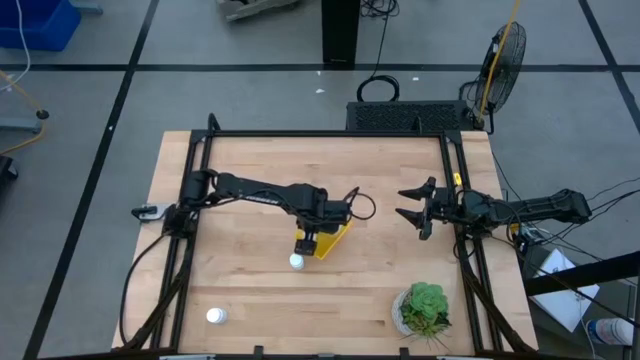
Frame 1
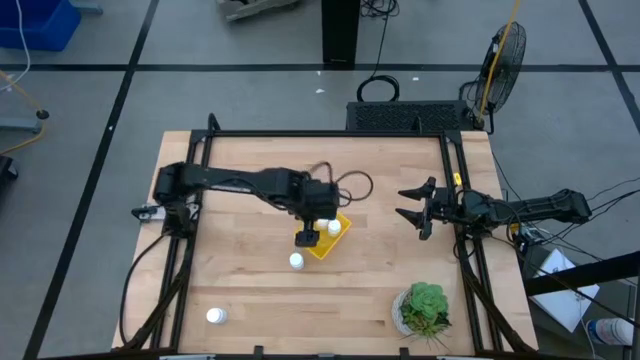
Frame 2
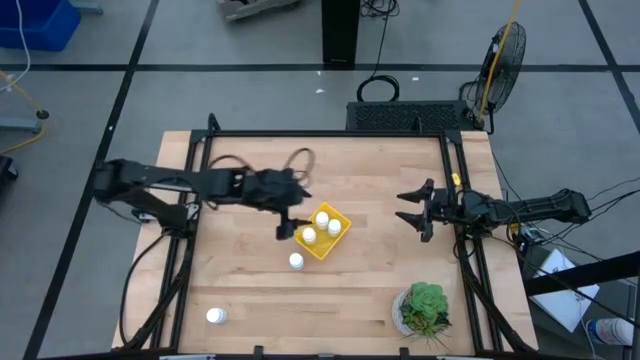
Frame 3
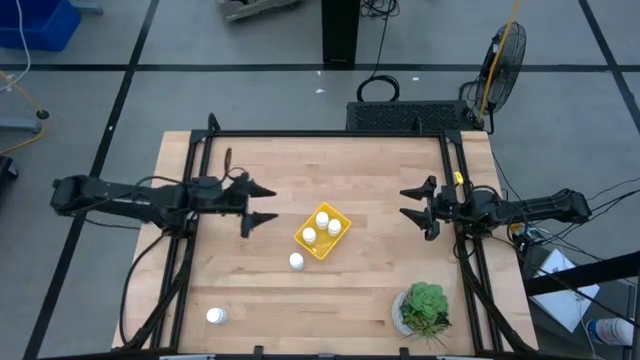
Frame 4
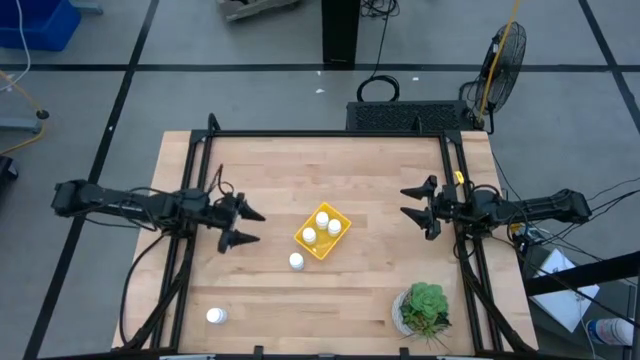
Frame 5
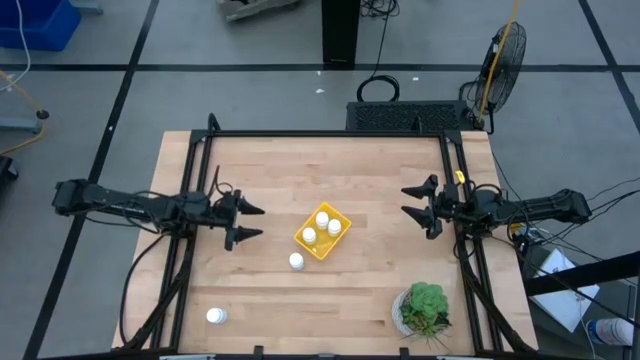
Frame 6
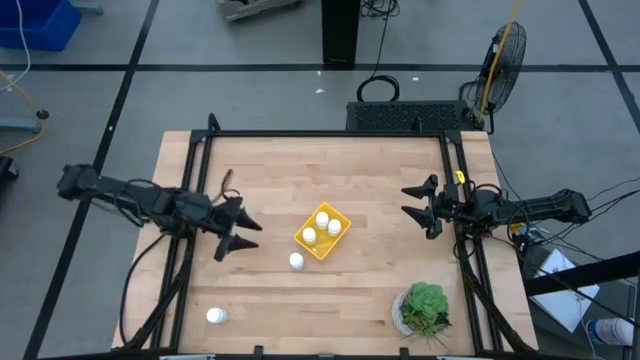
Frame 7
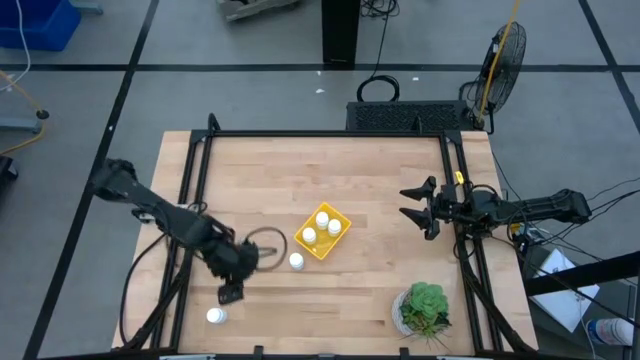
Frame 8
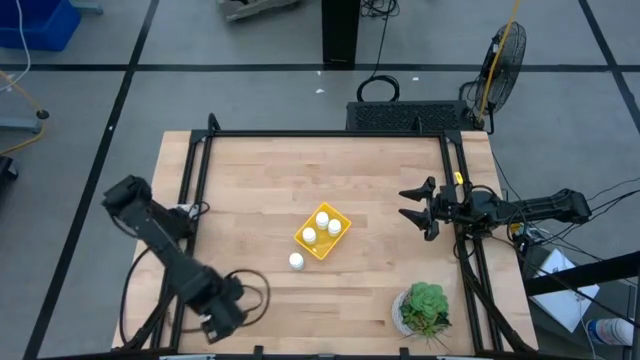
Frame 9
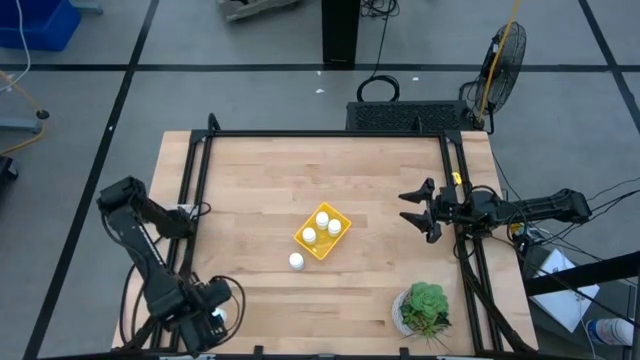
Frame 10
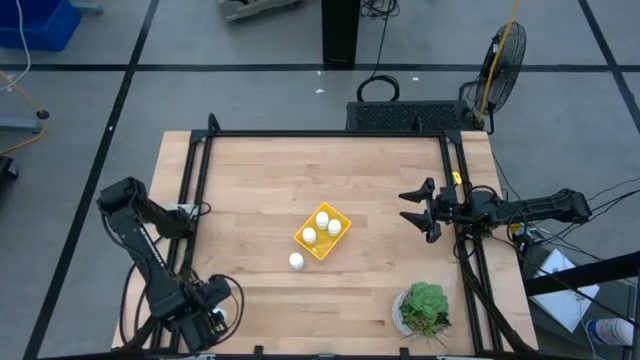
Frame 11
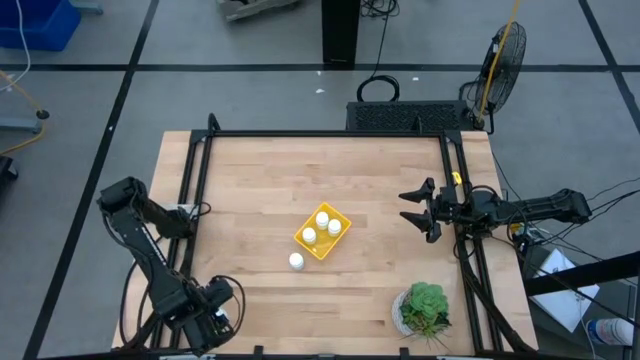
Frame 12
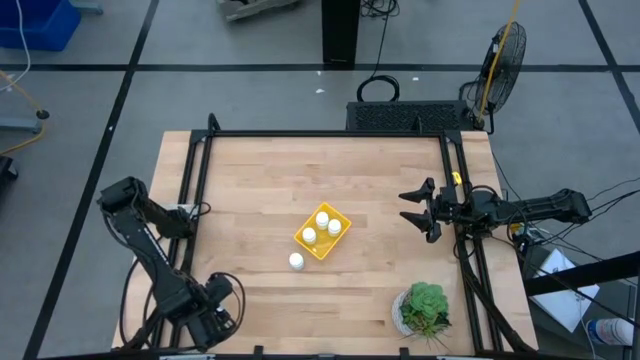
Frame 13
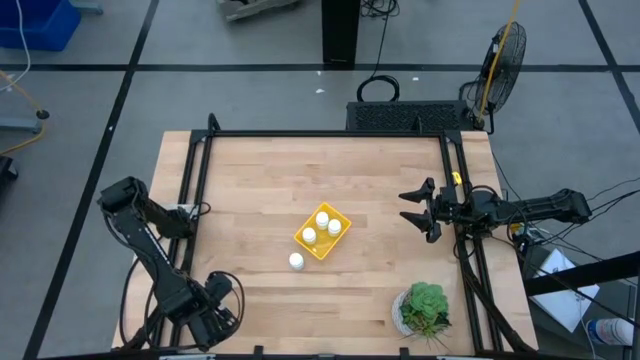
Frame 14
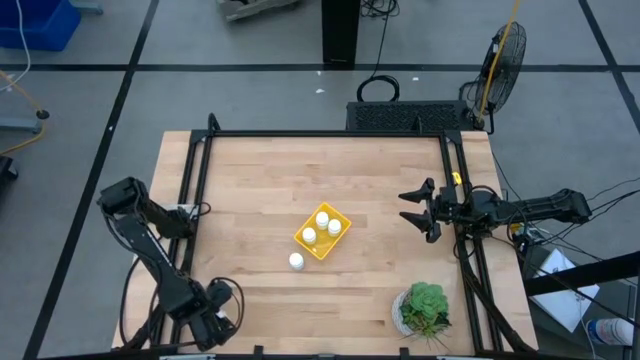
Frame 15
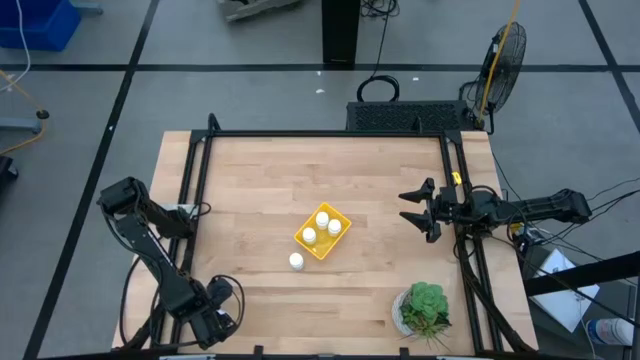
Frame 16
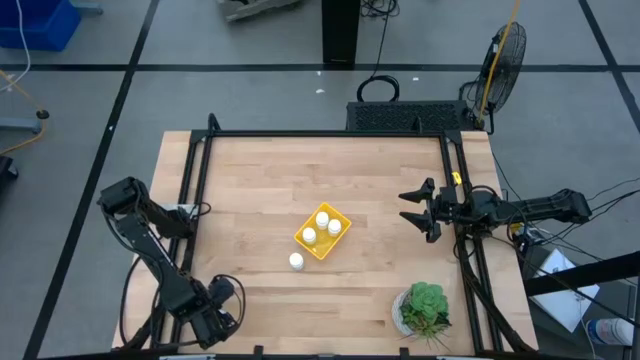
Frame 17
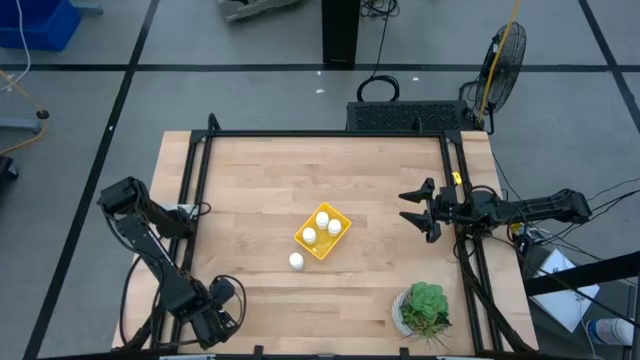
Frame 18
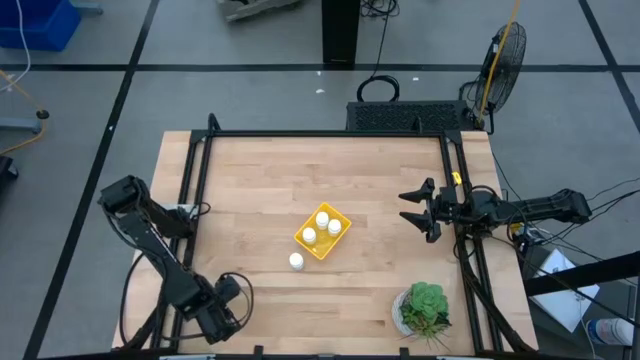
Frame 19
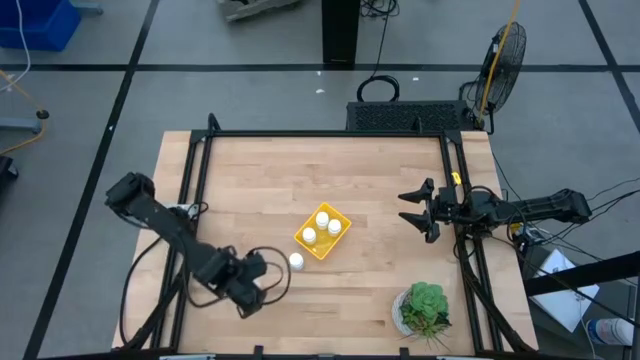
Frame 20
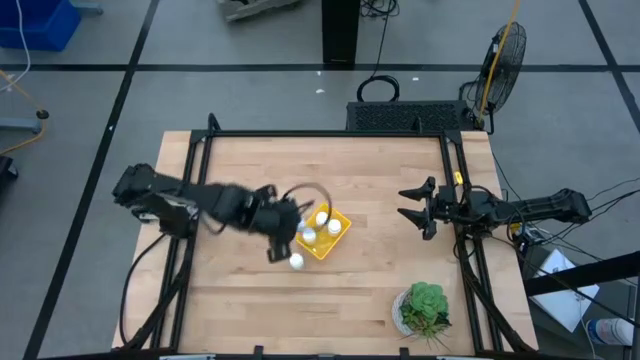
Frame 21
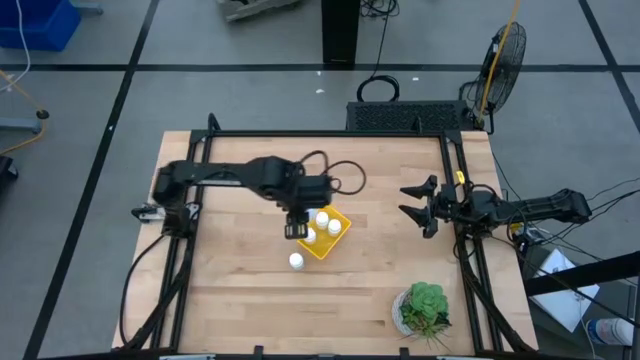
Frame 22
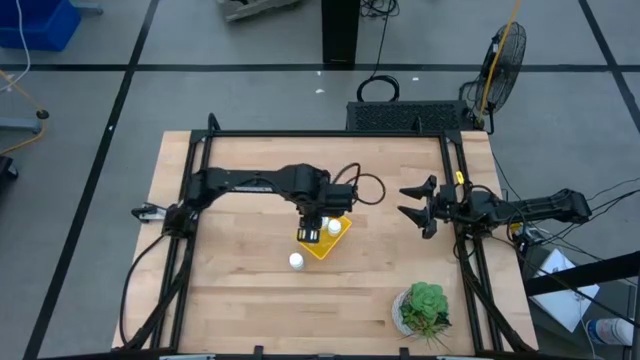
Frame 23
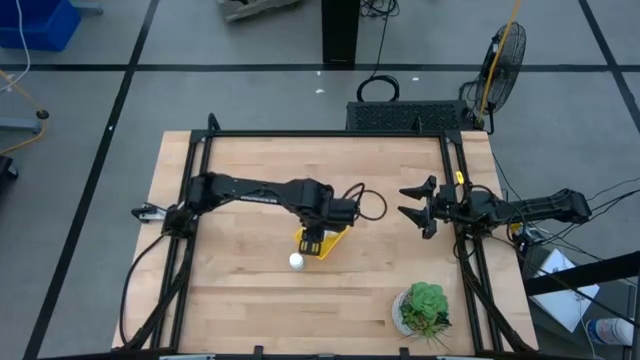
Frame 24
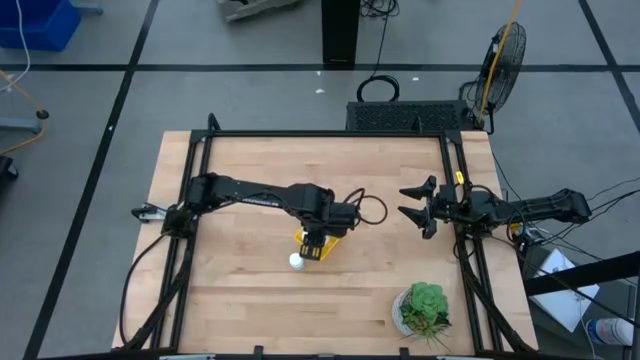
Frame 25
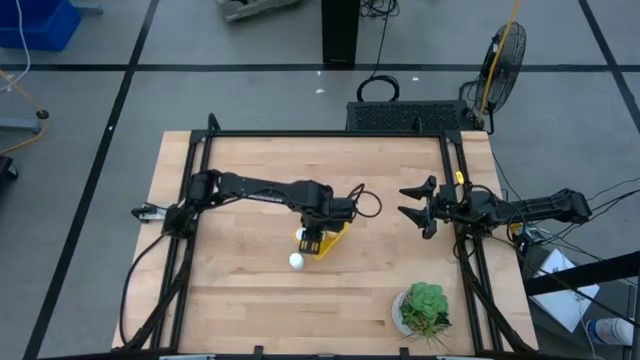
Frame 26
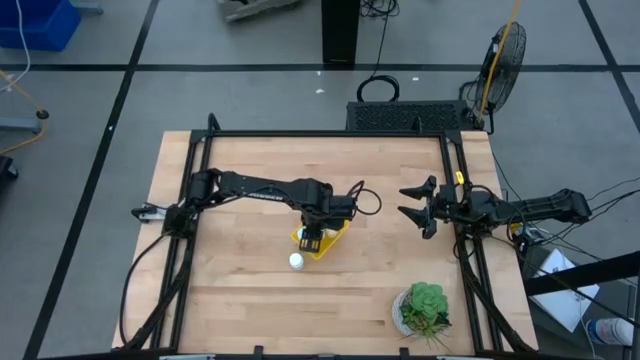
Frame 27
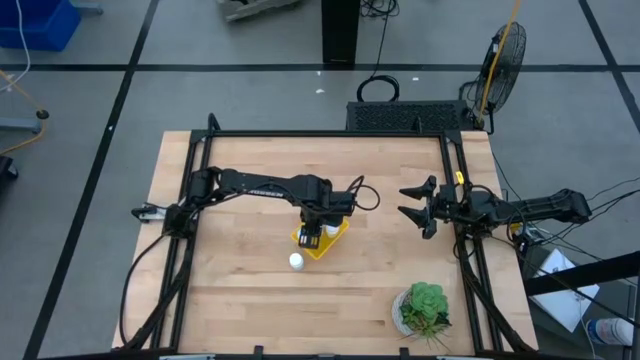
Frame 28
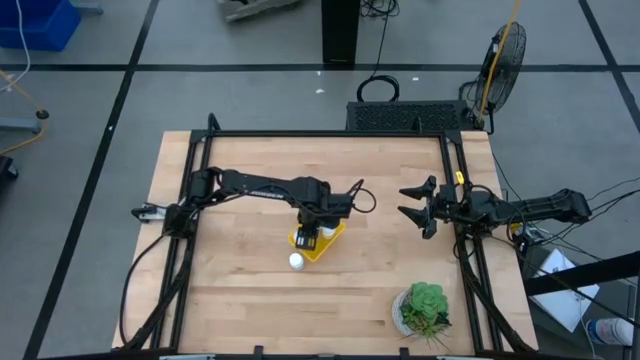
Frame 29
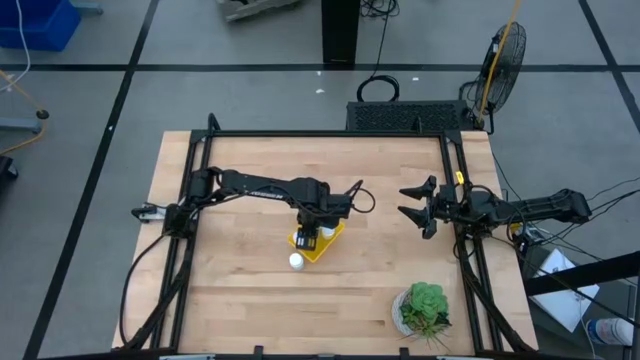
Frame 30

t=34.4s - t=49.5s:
Task: Pick and place pill bottles into a basket
Put the white medicine bottle into the yellow bin

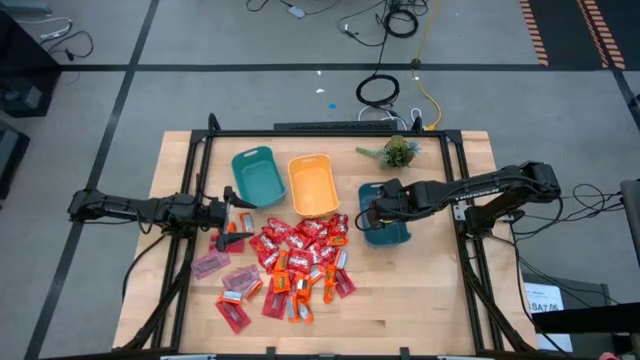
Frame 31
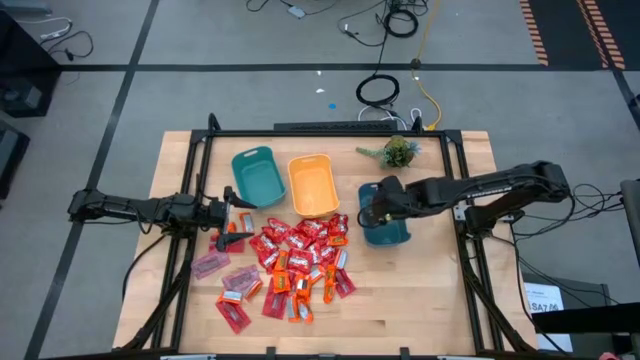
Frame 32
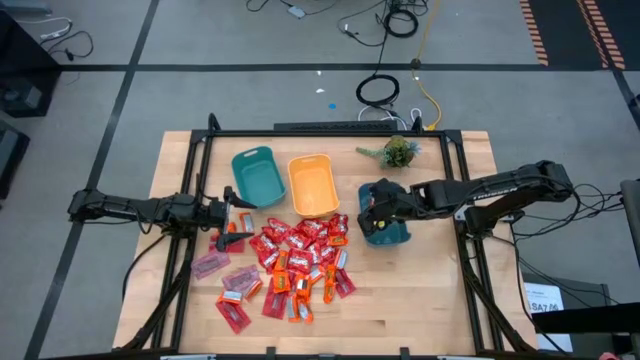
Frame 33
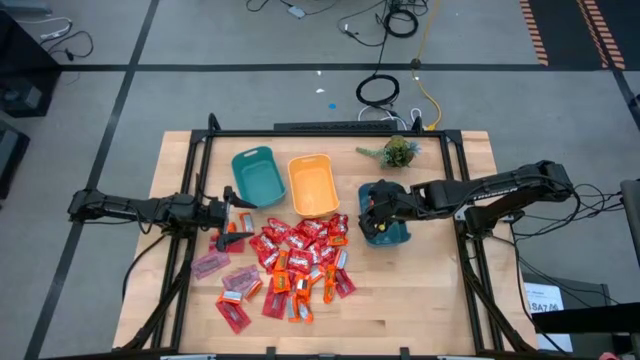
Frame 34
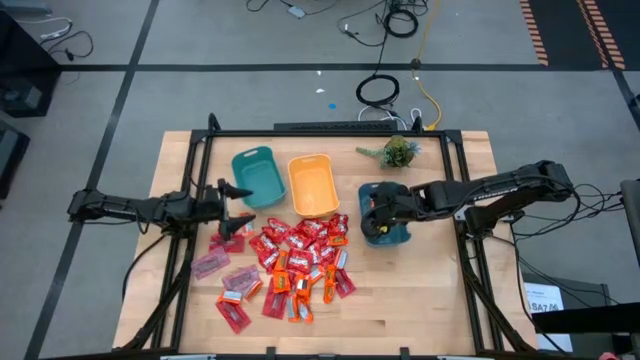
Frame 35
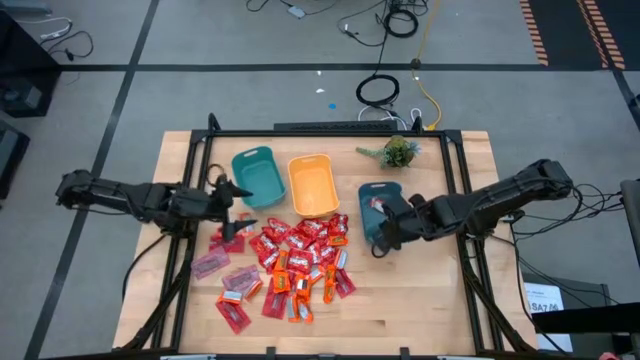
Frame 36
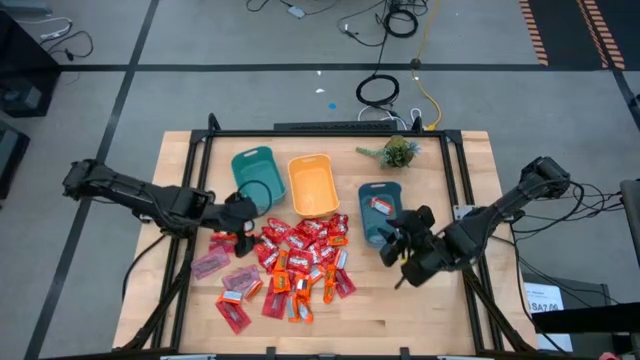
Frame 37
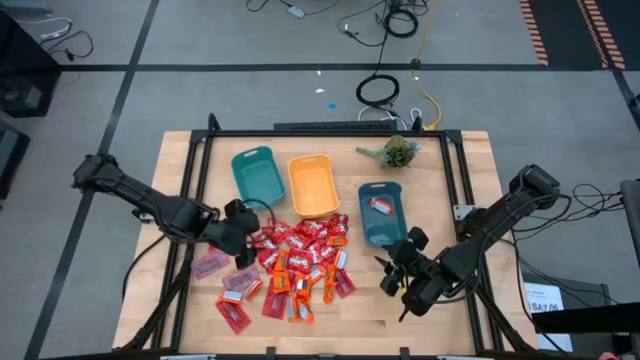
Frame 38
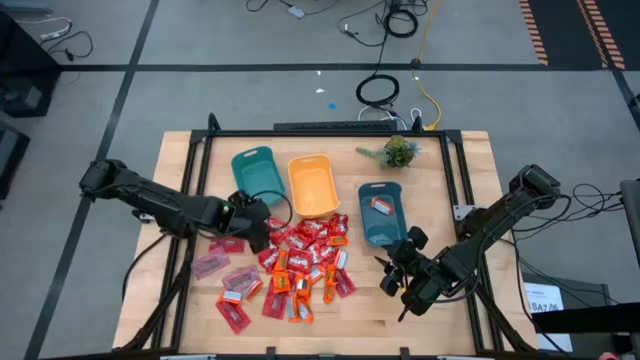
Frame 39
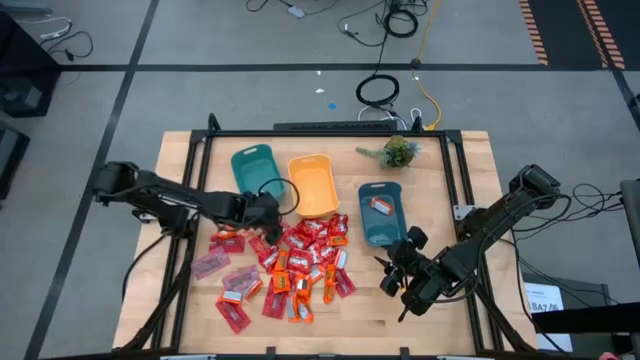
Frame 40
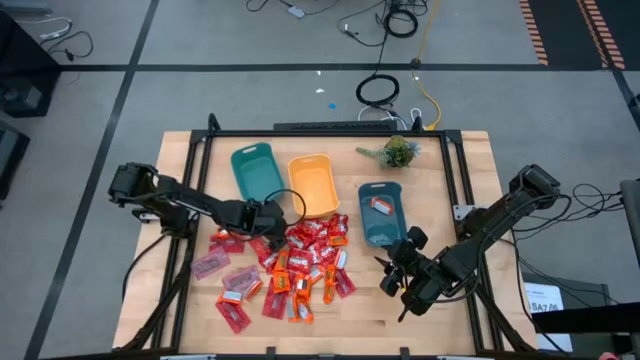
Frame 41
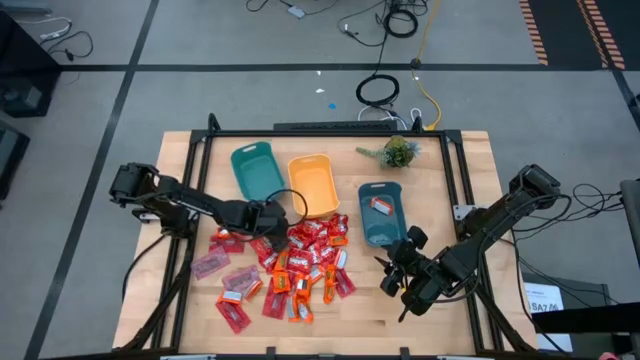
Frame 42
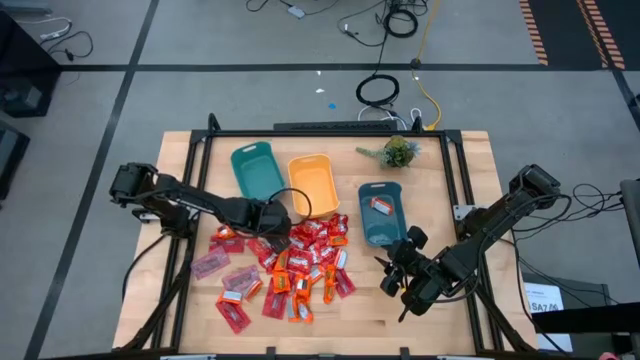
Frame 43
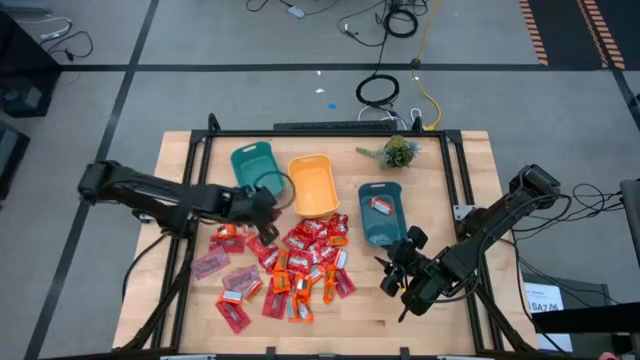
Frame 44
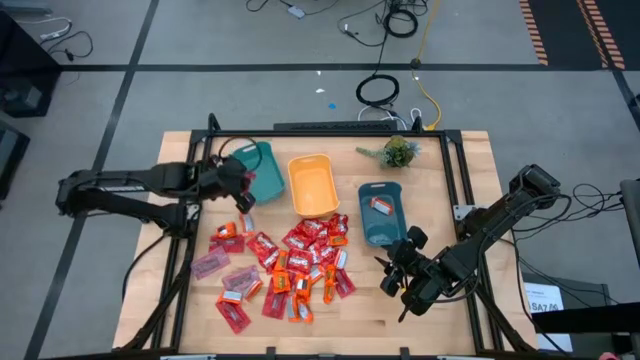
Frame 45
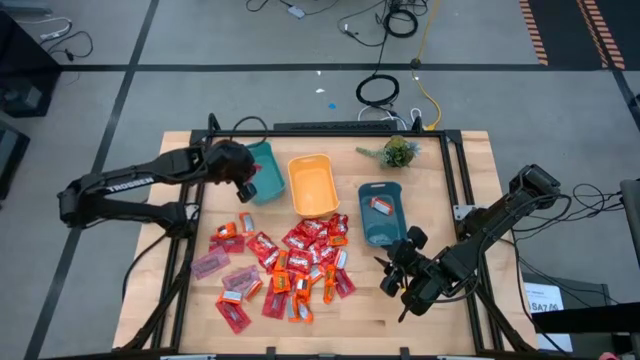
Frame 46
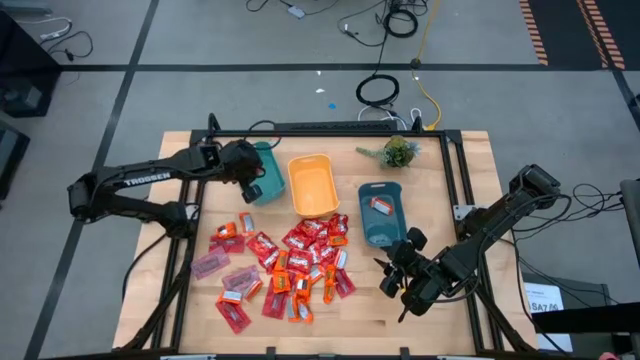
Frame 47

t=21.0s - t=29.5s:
Task: Sort candy
Put the red pack of candy into the light blue bin
